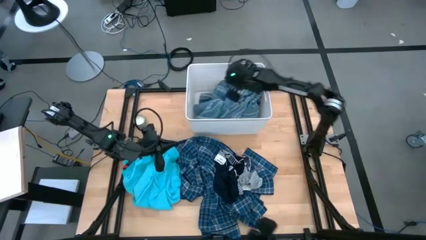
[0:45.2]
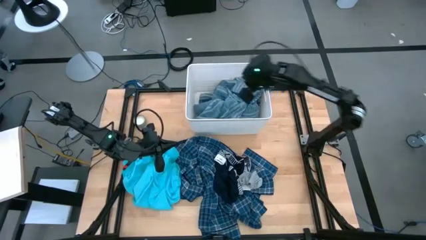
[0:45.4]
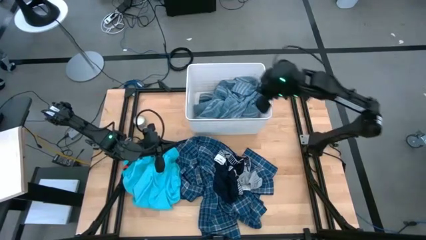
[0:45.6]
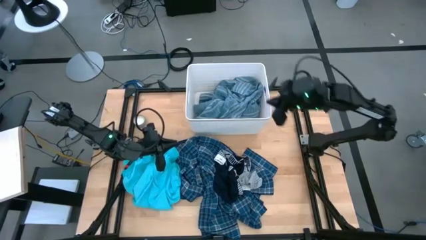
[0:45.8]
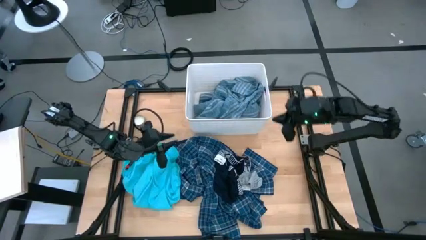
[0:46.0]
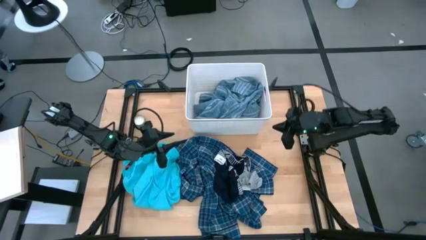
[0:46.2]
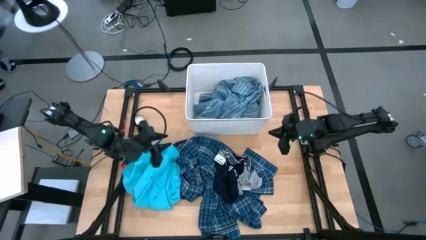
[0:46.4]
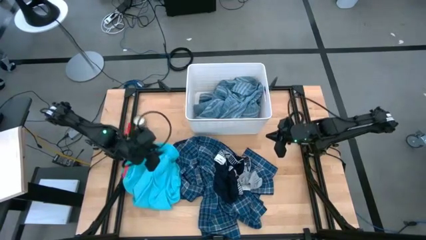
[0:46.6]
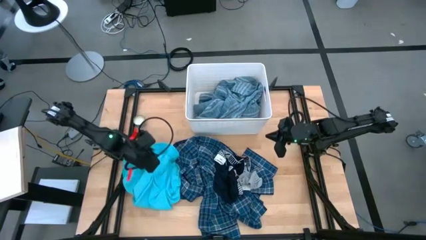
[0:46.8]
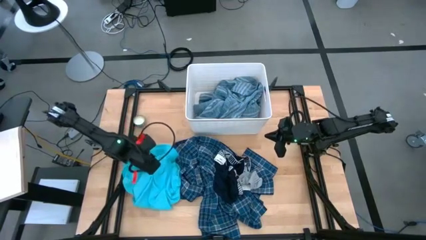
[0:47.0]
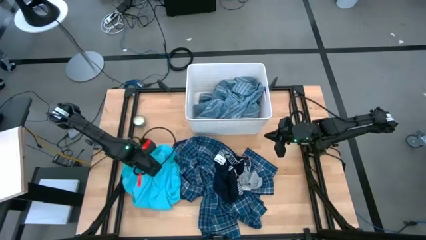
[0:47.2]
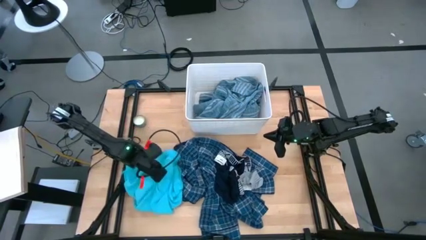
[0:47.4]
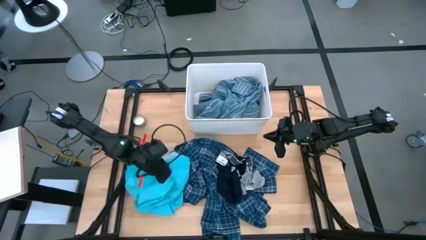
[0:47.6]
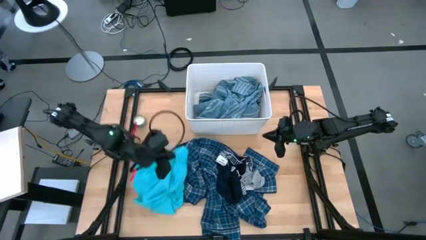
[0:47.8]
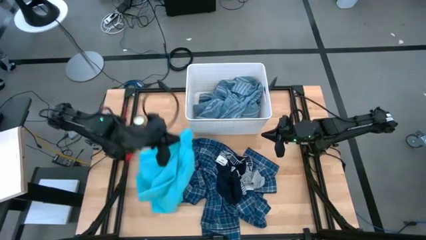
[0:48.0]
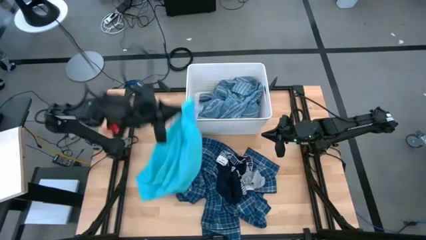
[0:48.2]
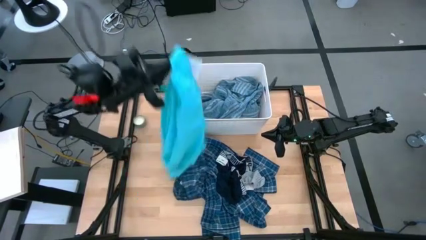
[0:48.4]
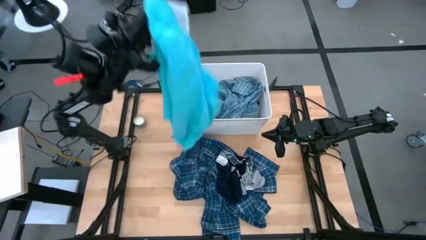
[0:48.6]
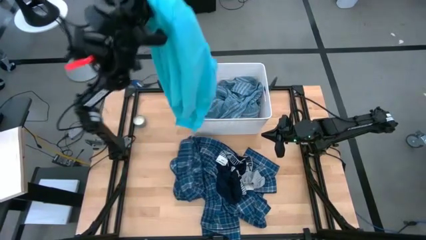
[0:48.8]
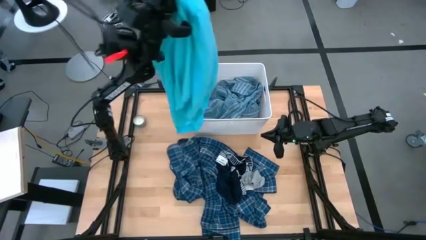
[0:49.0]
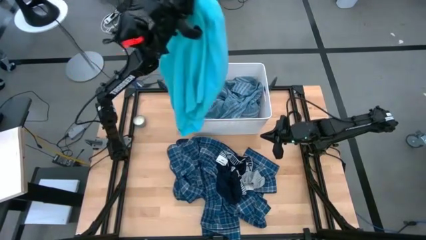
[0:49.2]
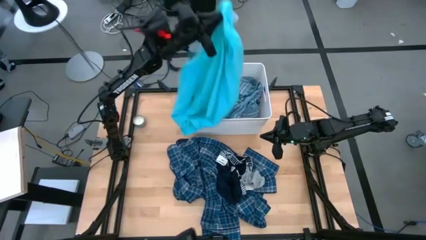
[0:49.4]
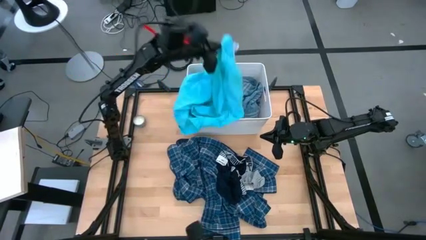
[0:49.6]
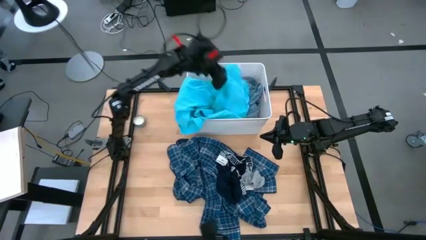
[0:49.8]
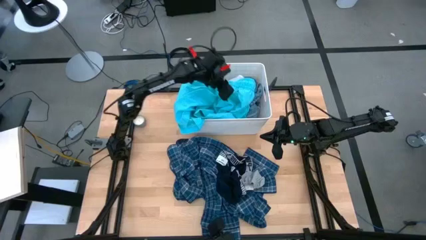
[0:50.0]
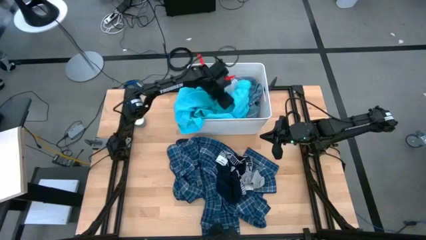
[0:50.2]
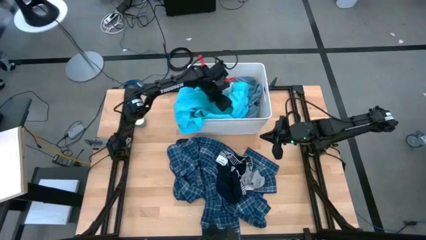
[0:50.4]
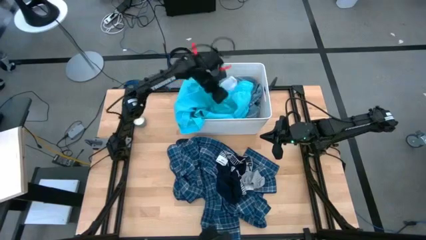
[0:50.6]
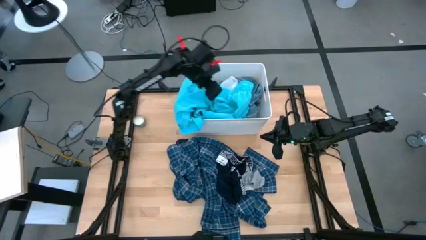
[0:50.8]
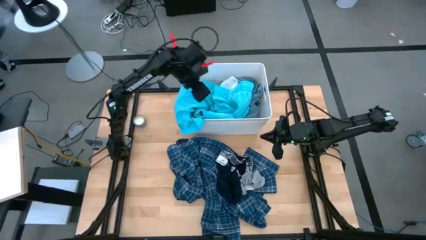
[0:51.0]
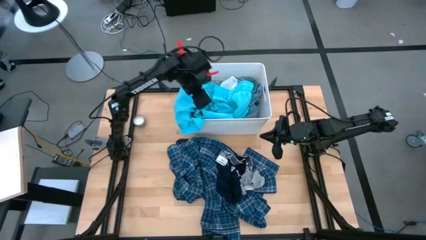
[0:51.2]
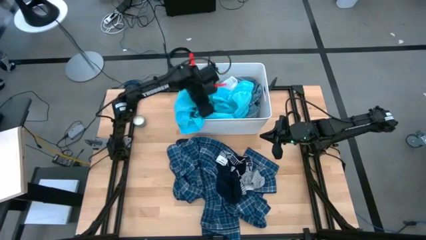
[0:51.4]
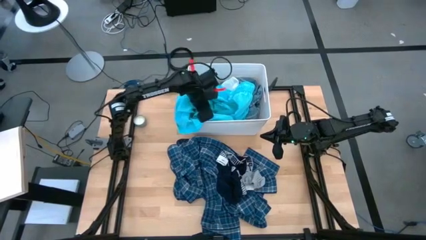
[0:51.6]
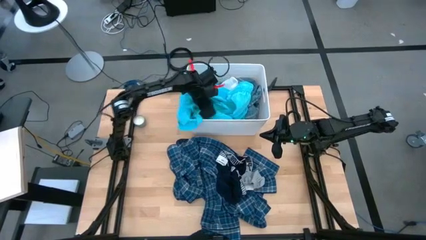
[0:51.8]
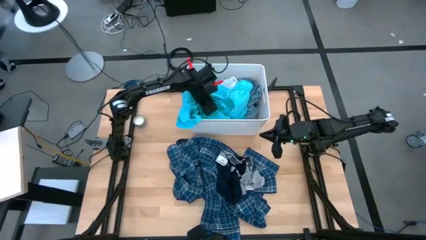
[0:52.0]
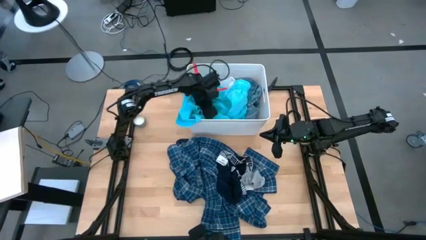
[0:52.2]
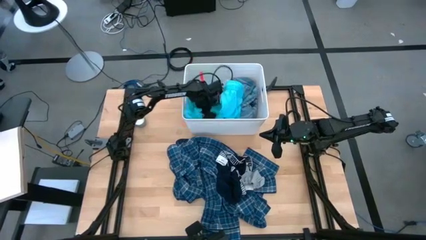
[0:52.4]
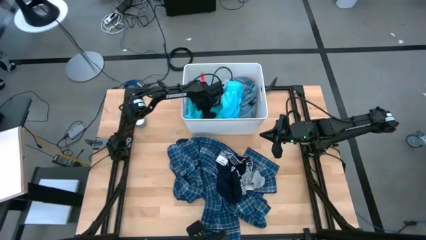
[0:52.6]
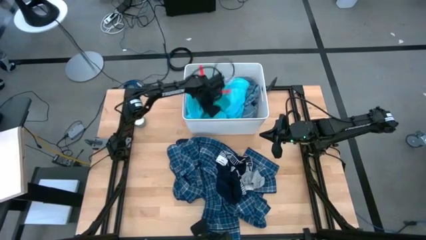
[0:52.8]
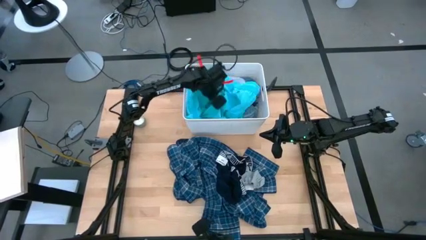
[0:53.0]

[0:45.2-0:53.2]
Task: Sort clothes
Put the blue shorts into the white bin

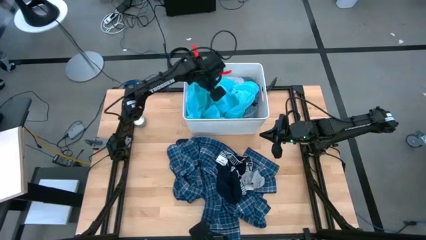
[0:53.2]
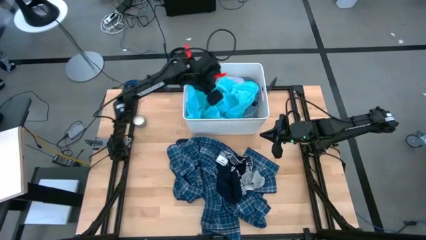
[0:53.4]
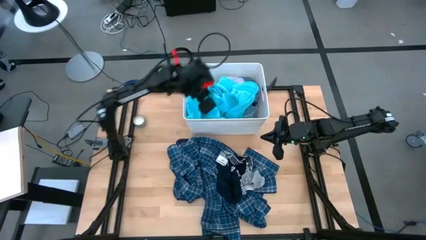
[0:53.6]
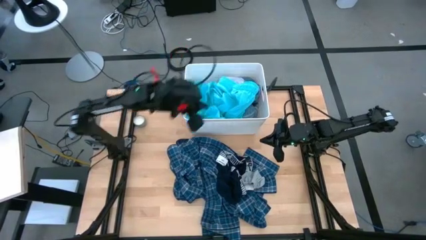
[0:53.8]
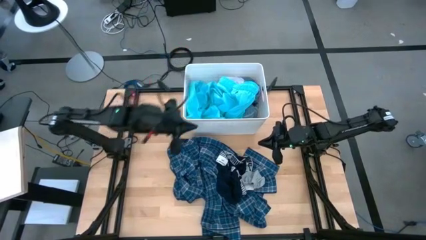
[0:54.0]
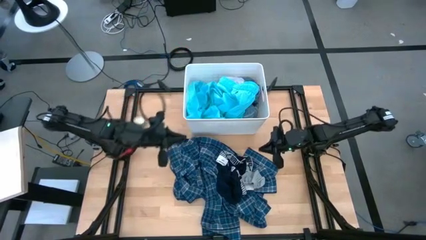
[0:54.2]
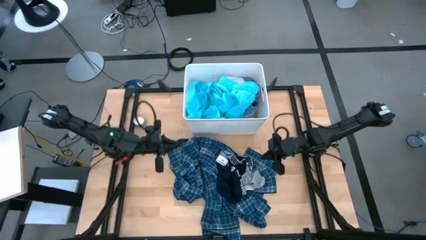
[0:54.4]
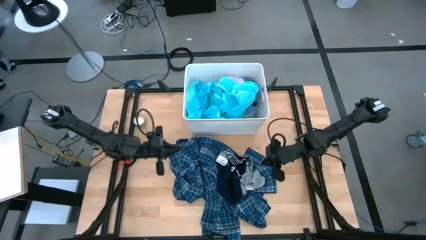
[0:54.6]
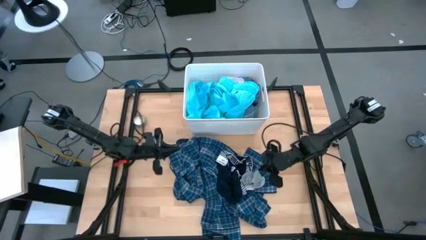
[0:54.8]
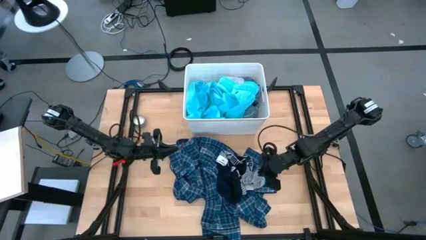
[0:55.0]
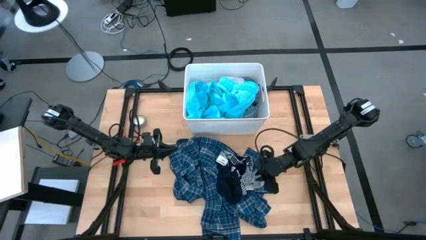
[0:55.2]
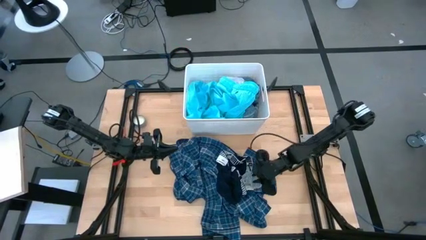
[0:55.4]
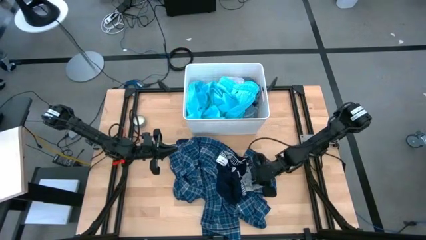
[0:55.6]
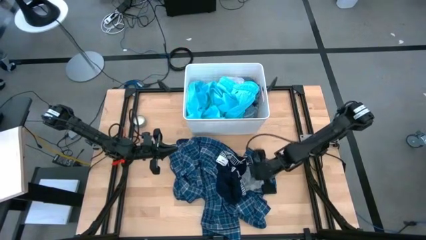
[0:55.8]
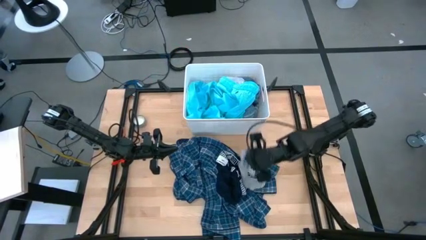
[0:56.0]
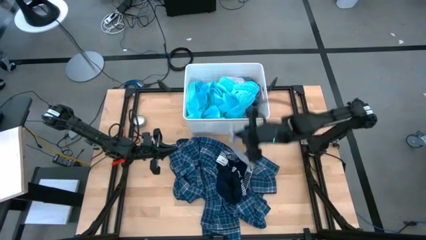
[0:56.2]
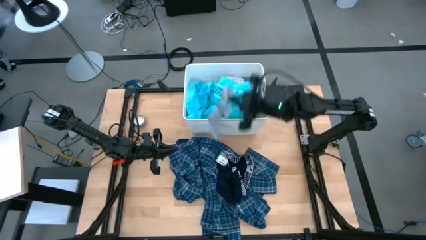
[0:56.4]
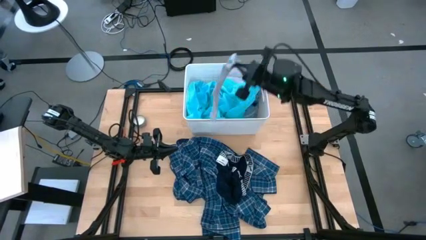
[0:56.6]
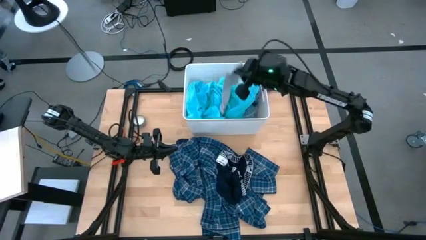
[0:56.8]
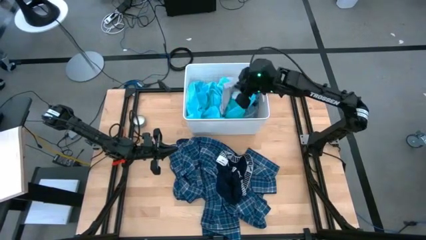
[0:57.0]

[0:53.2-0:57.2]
Put the gray sock into the white bin

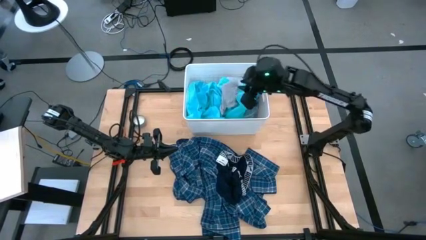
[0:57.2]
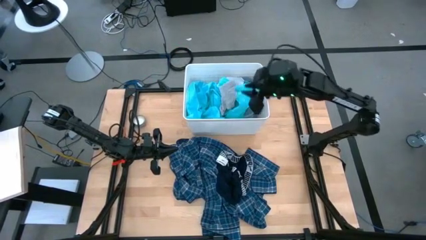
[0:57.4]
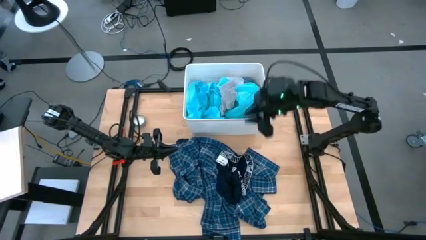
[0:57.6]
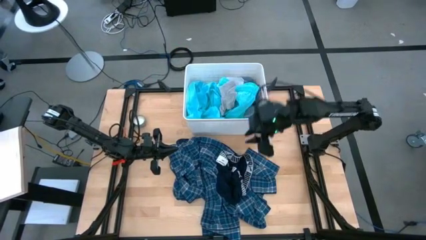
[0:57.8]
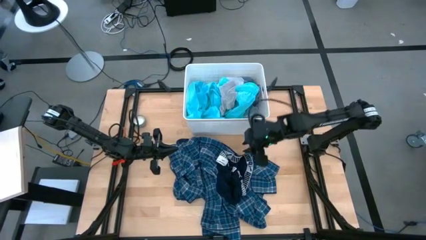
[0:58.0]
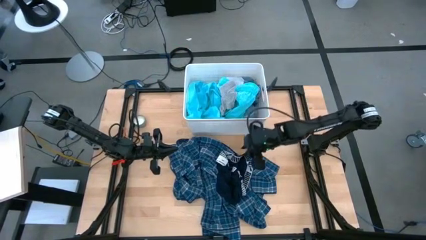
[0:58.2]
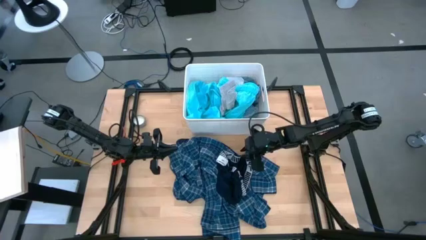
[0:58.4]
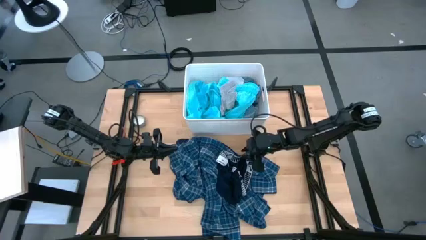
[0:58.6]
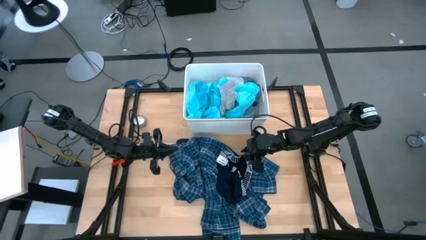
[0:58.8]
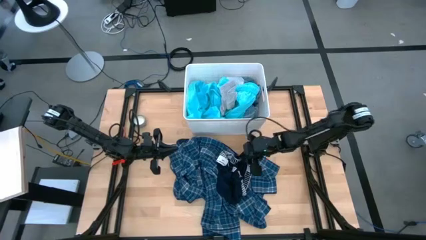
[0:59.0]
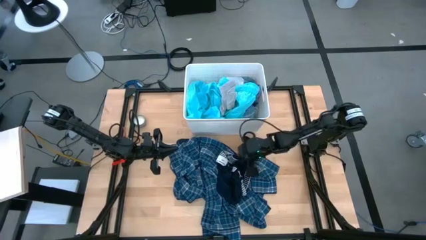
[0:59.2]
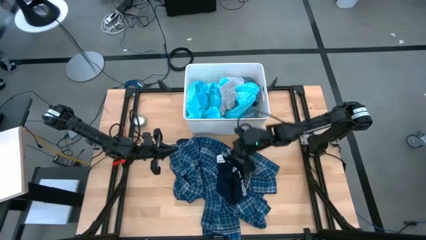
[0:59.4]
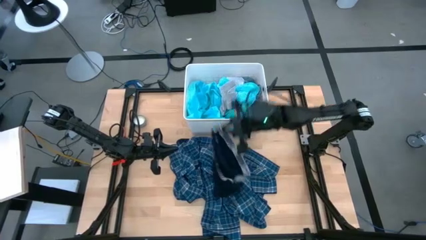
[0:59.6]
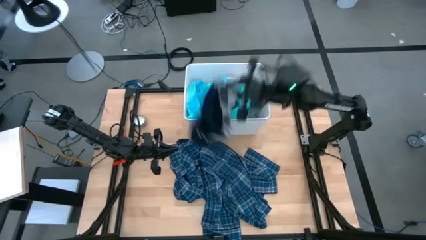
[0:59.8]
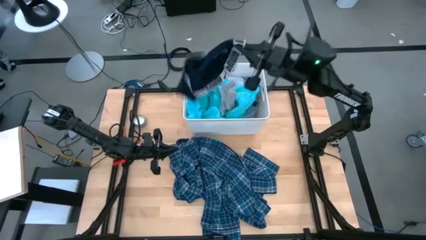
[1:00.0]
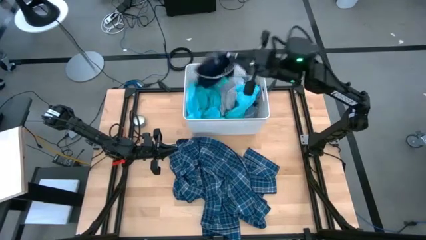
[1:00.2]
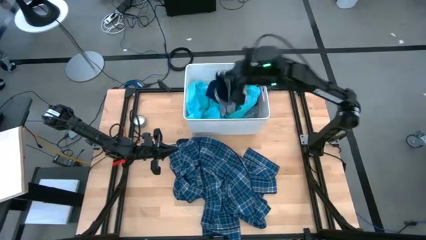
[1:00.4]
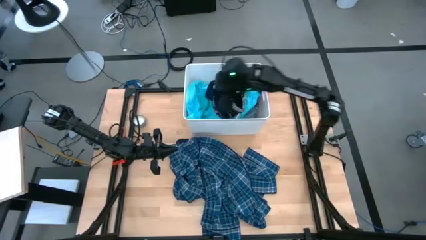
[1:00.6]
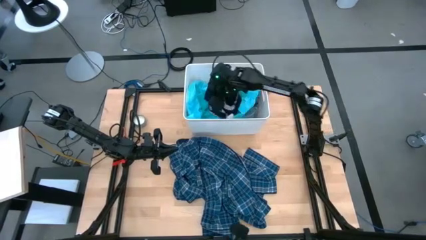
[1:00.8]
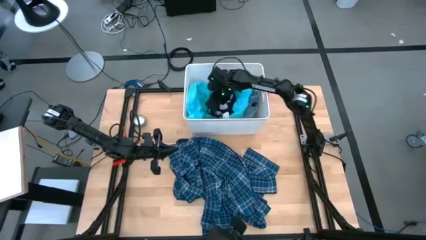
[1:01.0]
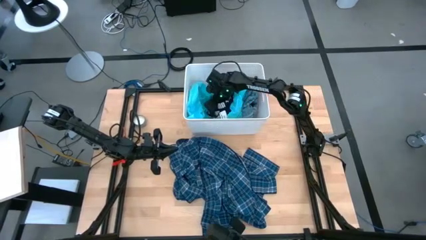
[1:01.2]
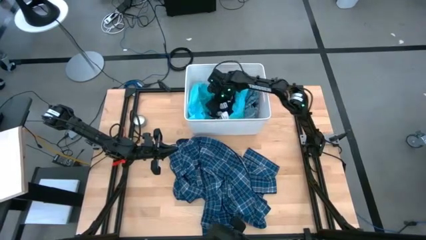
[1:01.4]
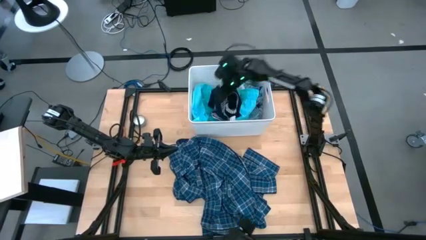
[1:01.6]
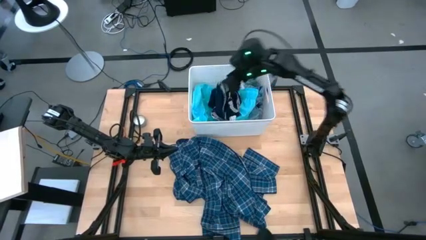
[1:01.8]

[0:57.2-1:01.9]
Put the black boxers into the white bin
